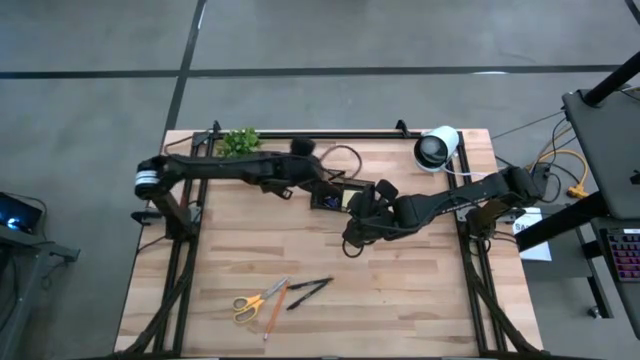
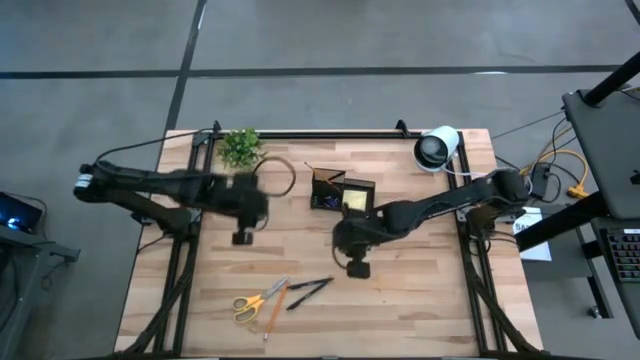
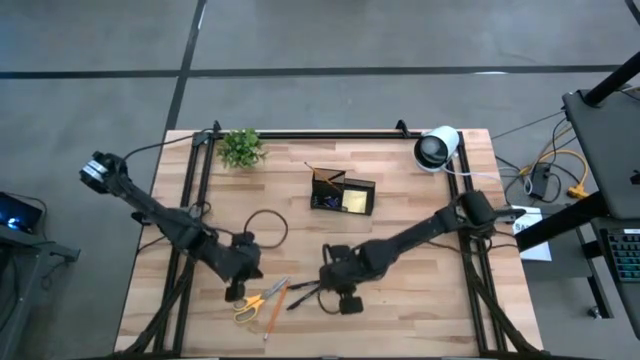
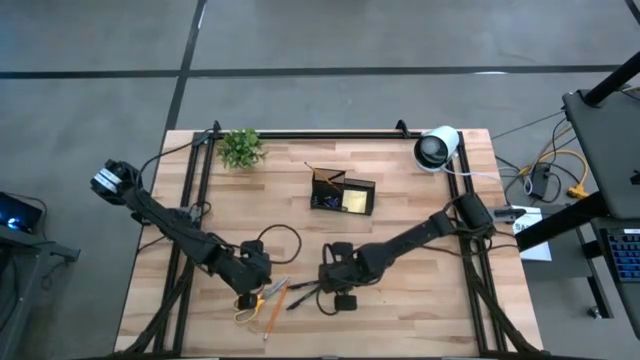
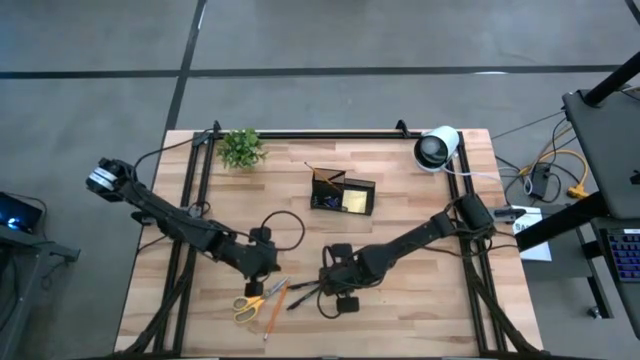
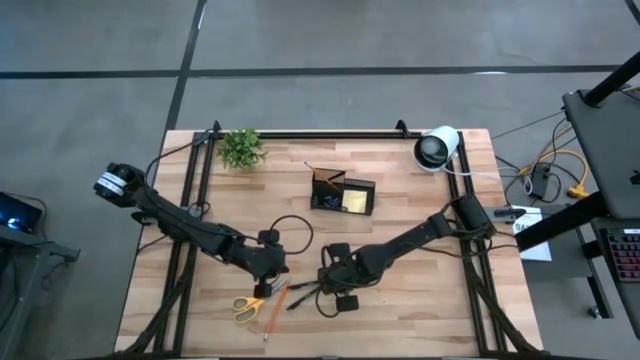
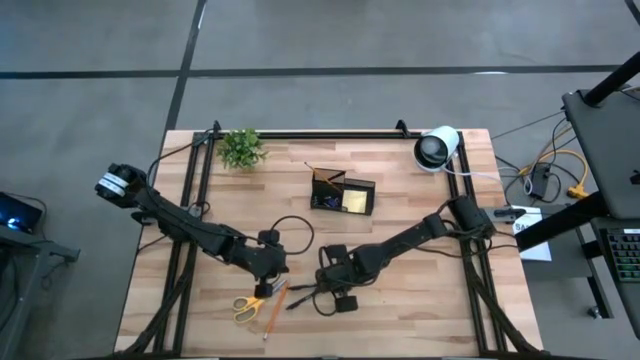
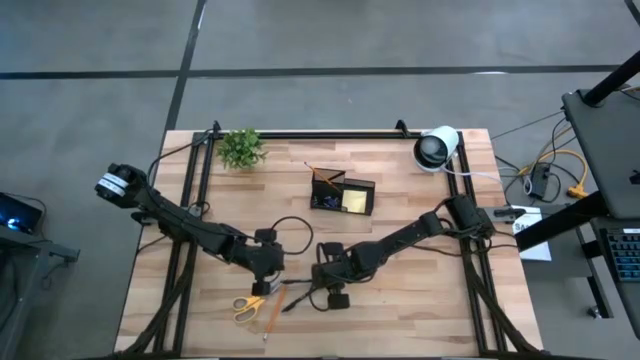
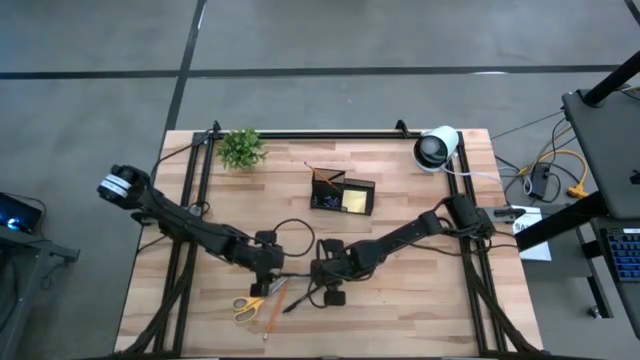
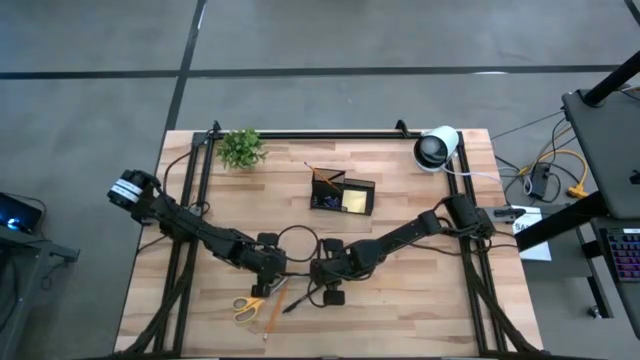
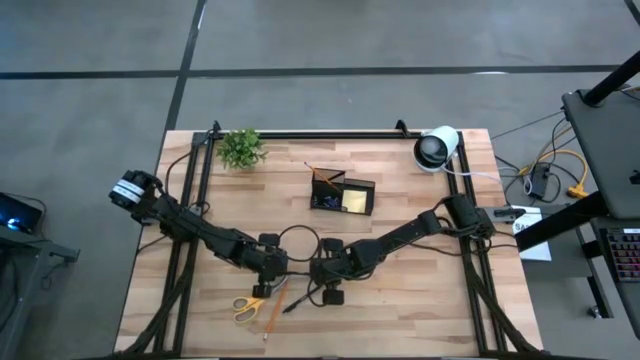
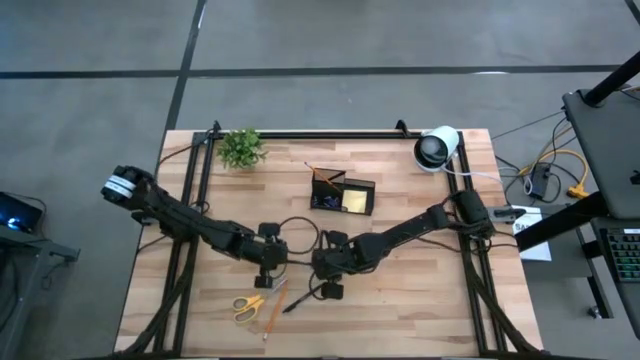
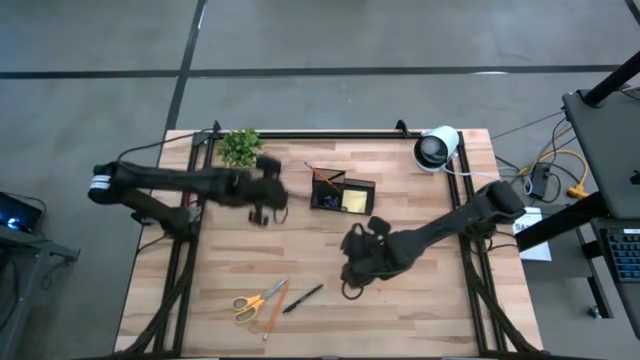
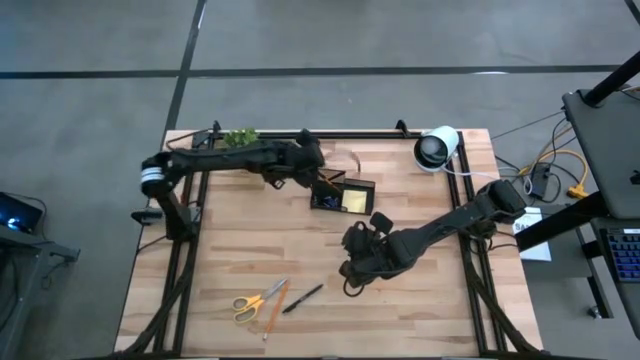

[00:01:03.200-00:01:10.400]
Task: Pick and place office supplies into organizer
Put the top black pen into the black desk organizer

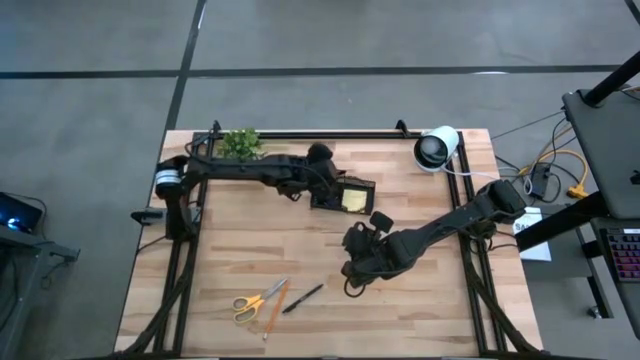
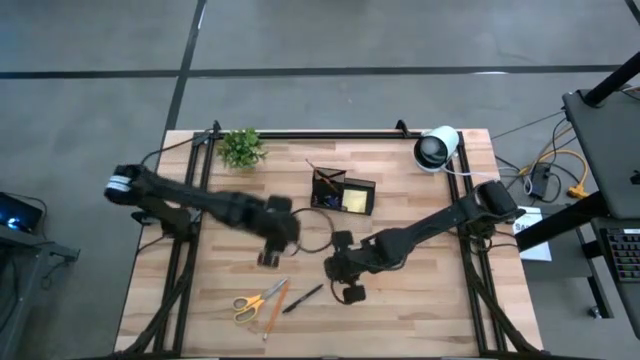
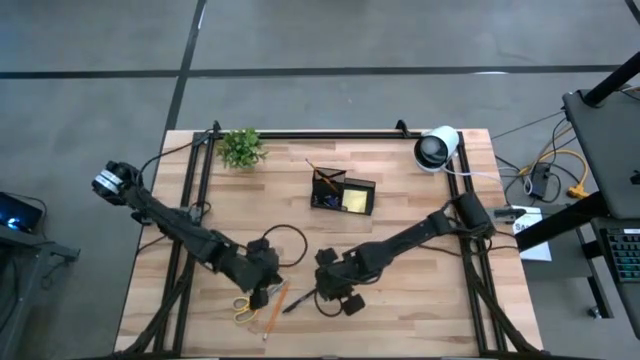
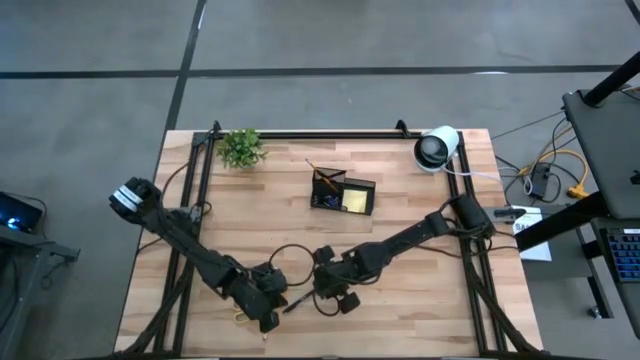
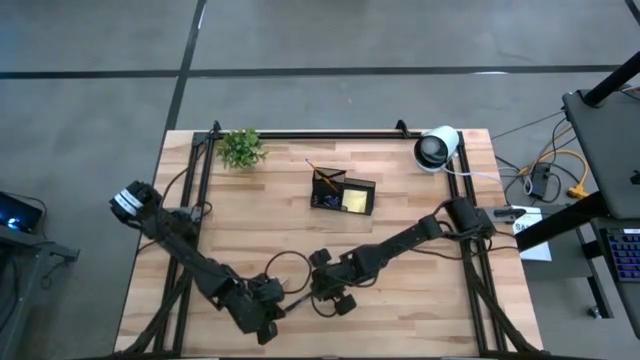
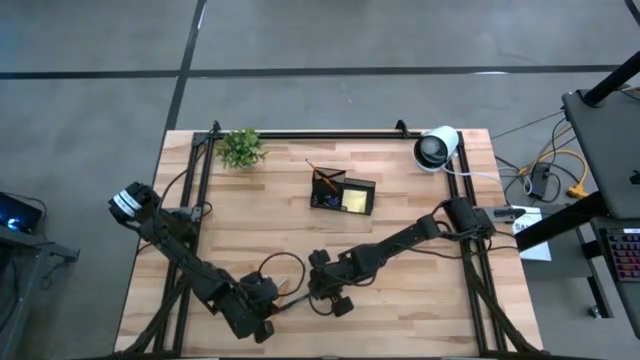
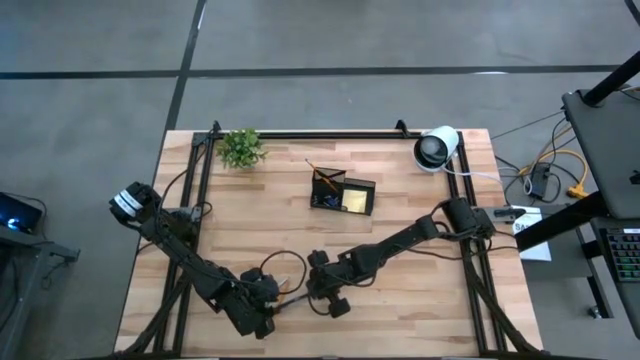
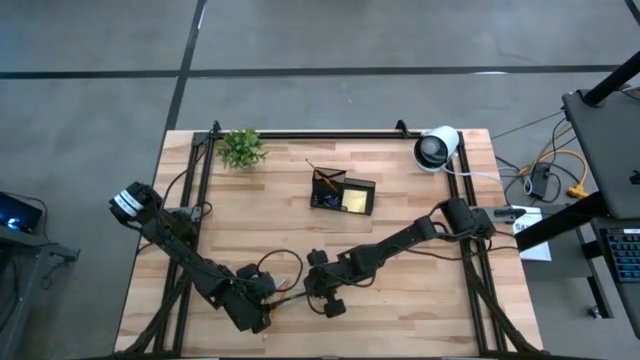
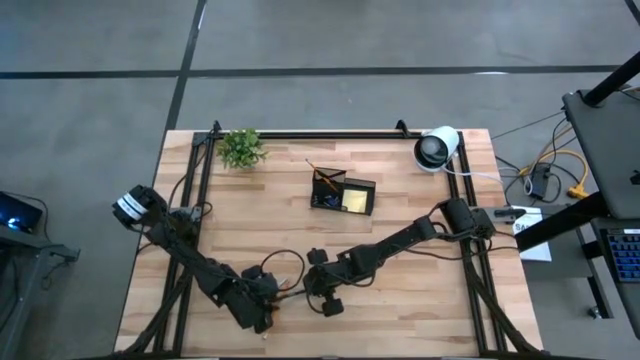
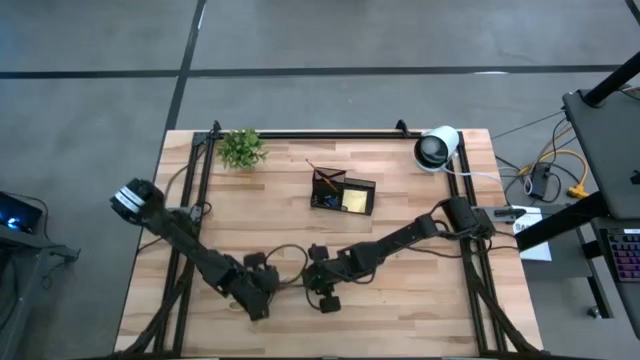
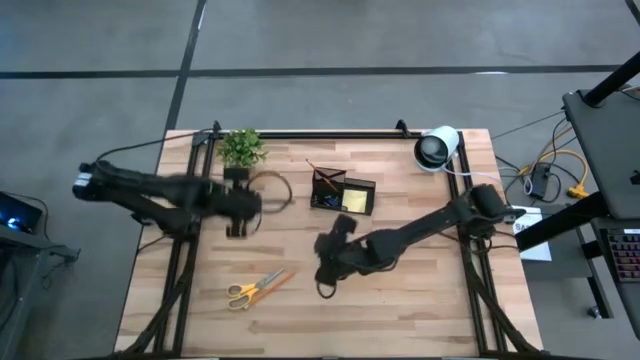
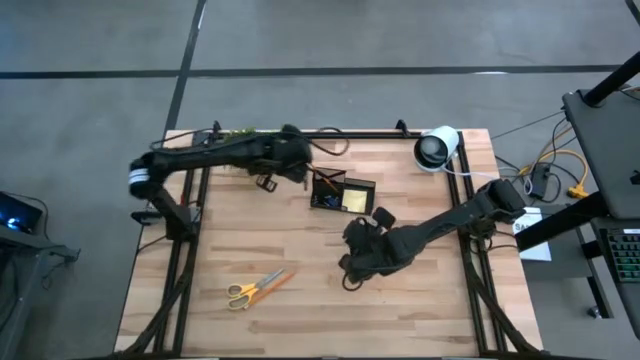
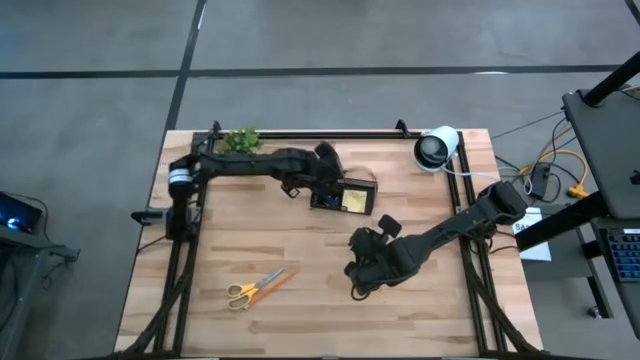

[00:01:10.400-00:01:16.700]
Put the black pen into the black desk organizer

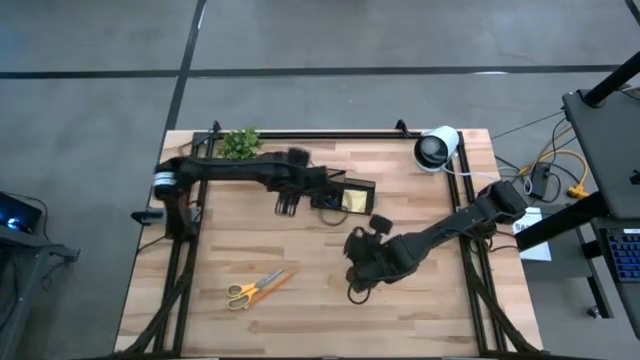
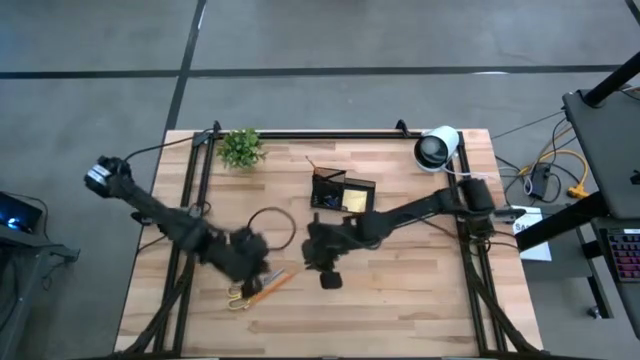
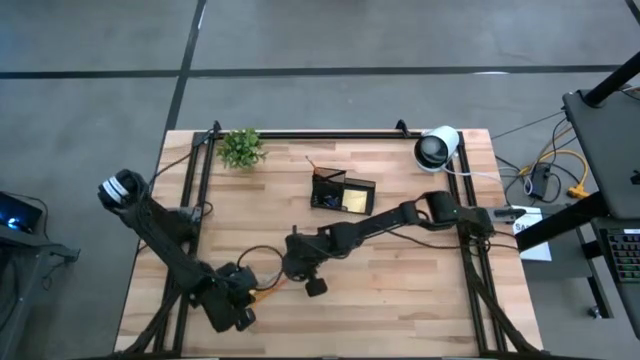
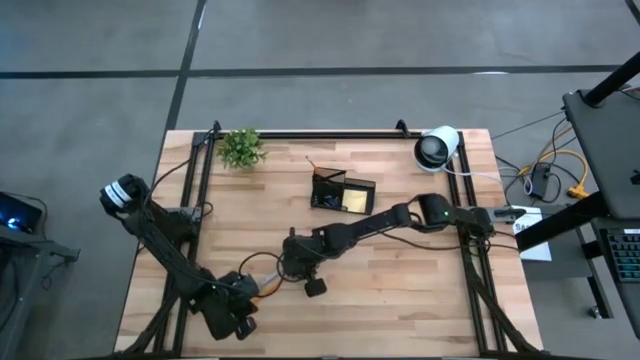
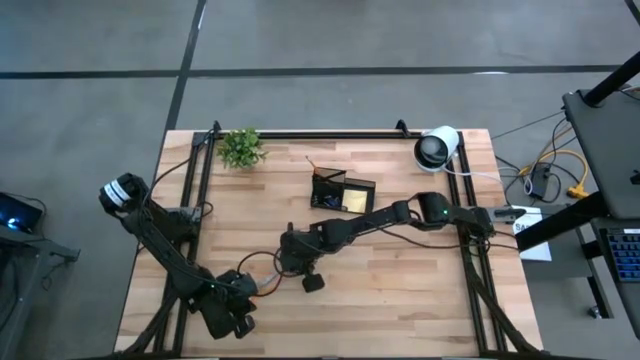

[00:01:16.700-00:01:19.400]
Put the orange pencil into the black desk organizer

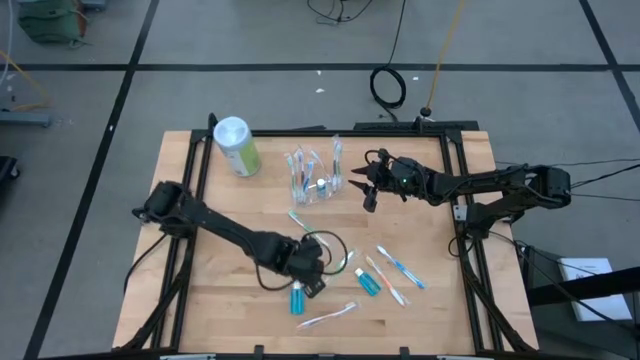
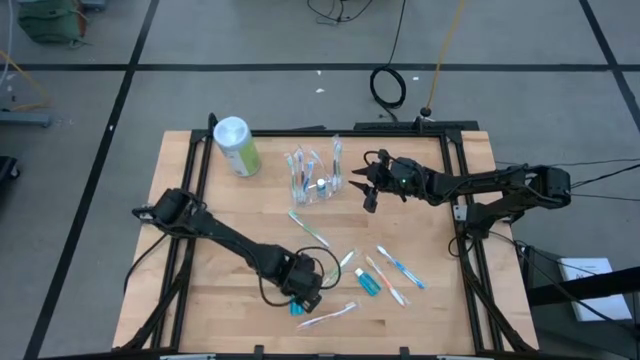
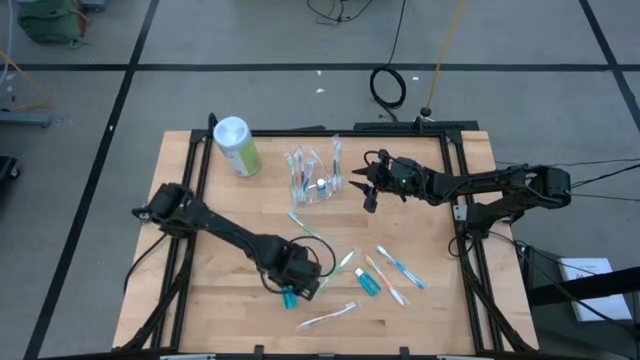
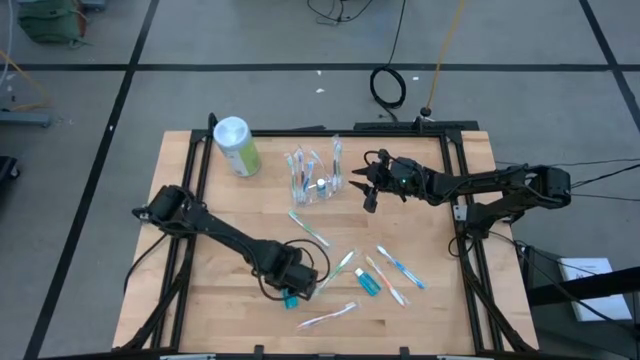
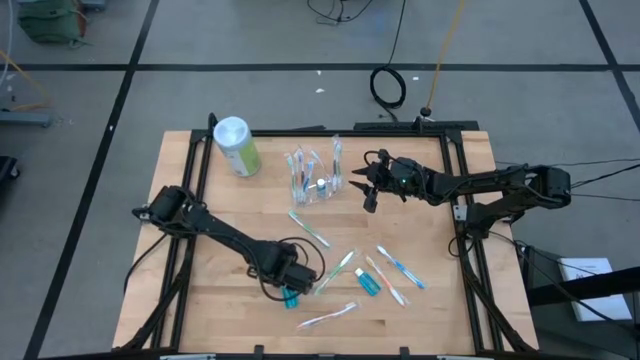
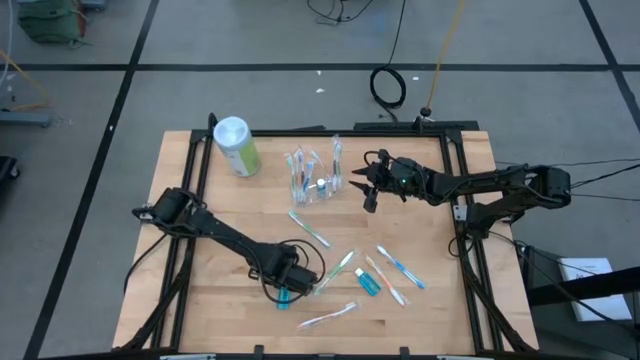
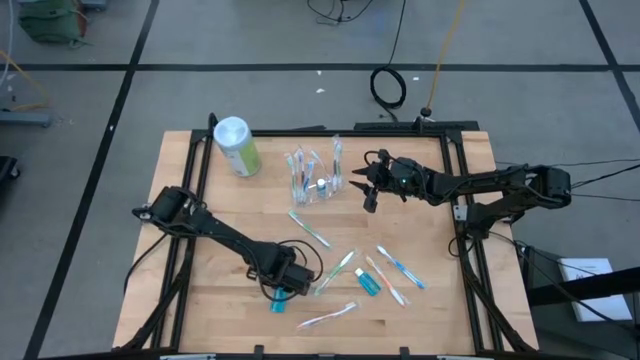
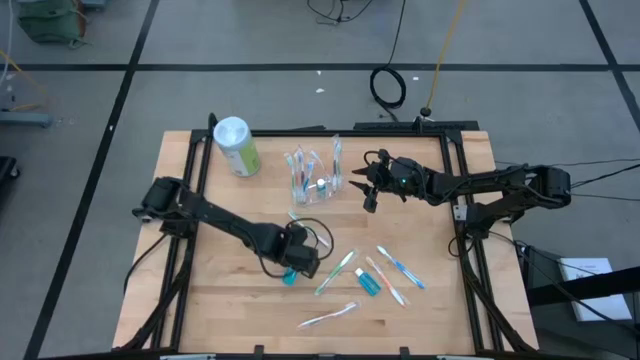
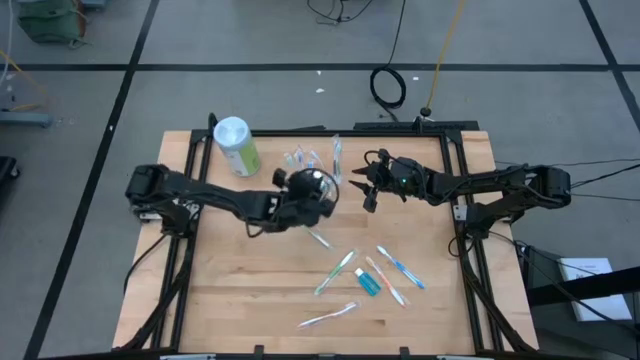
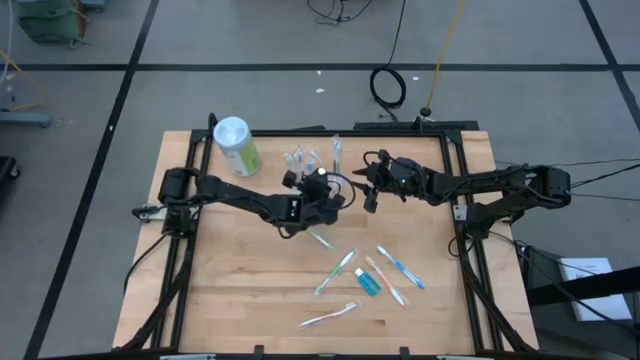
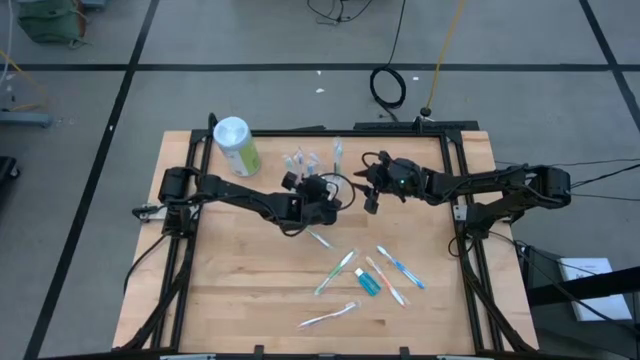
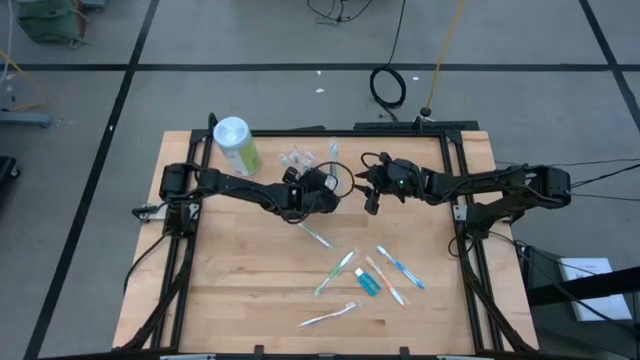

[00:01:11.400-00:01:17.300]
Task: Pick & Place toothbrushing station
Put the blue mouthwash into the transparent organizer
